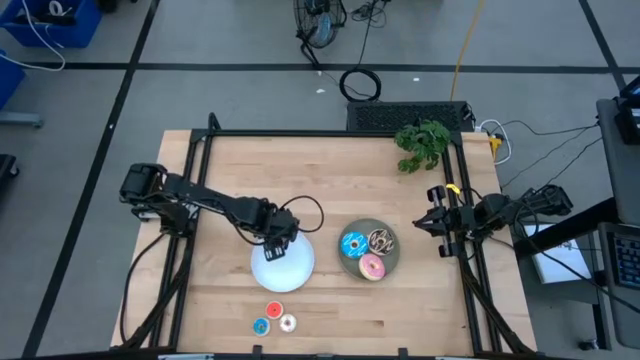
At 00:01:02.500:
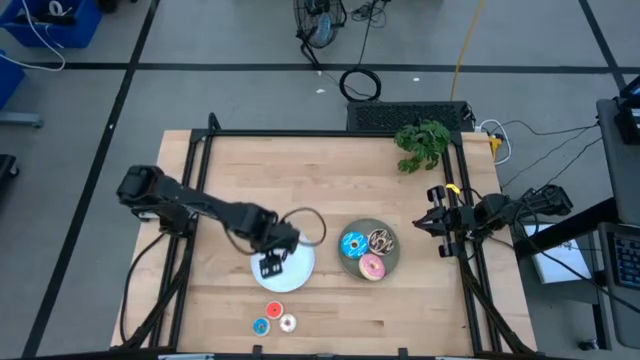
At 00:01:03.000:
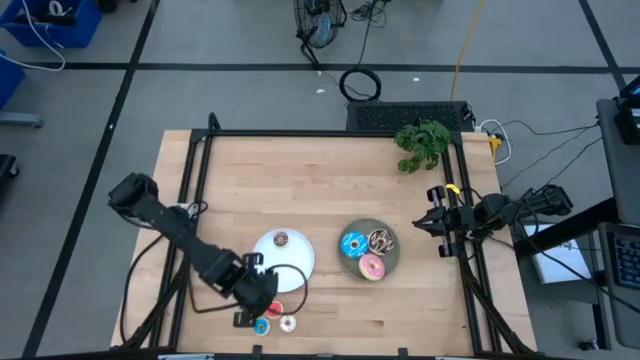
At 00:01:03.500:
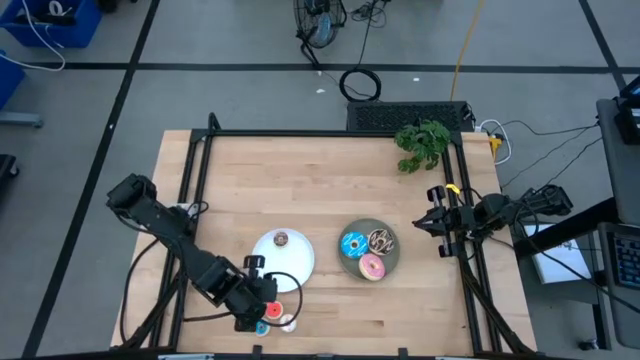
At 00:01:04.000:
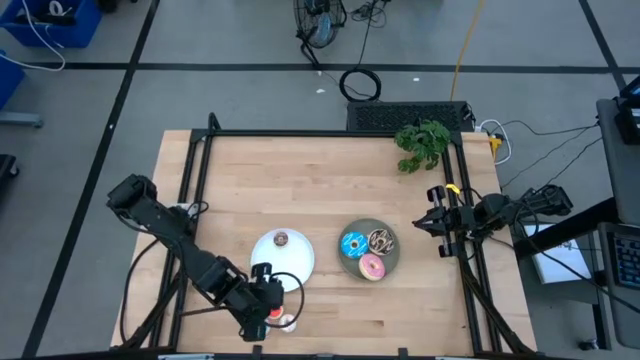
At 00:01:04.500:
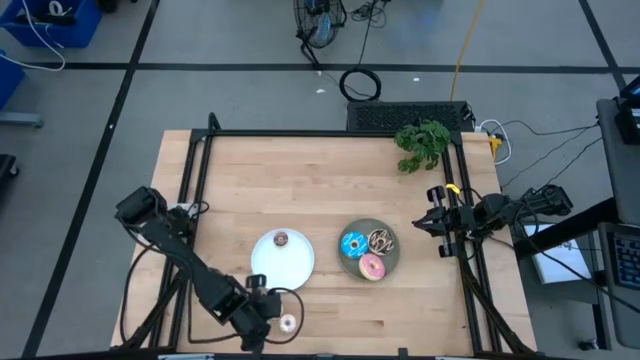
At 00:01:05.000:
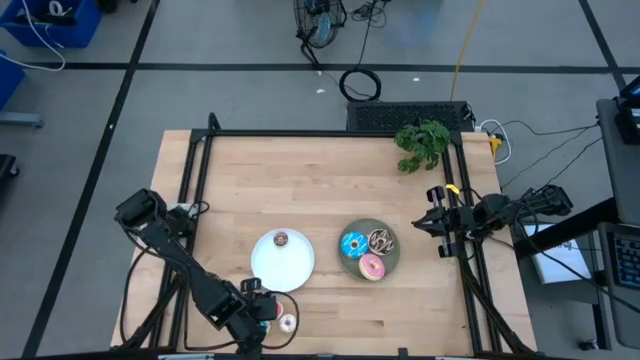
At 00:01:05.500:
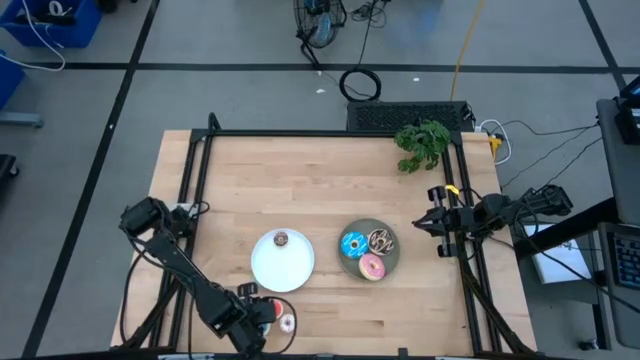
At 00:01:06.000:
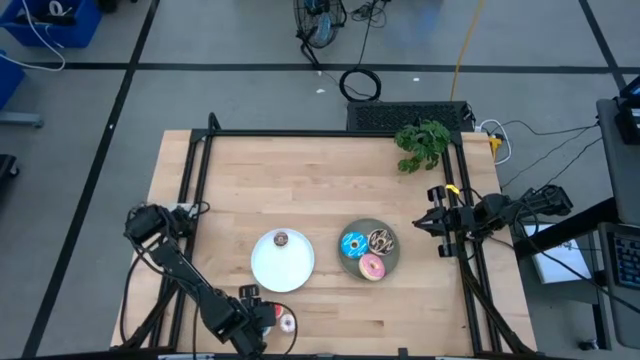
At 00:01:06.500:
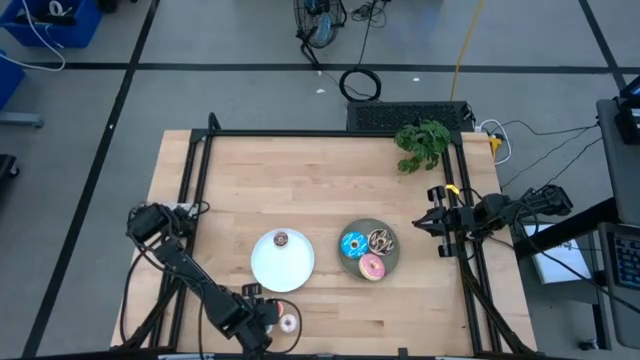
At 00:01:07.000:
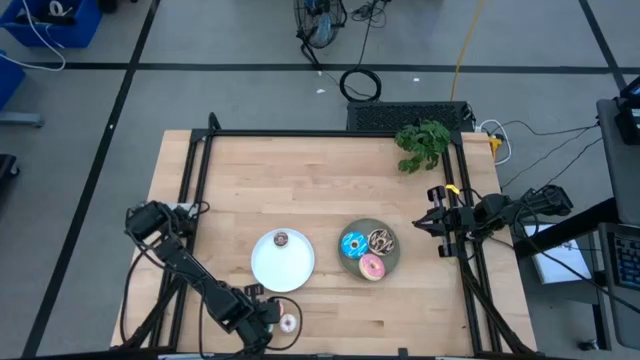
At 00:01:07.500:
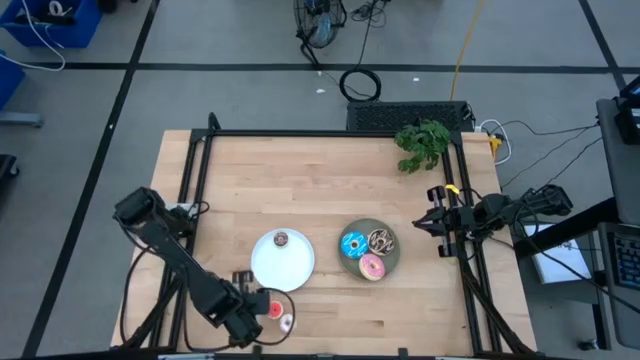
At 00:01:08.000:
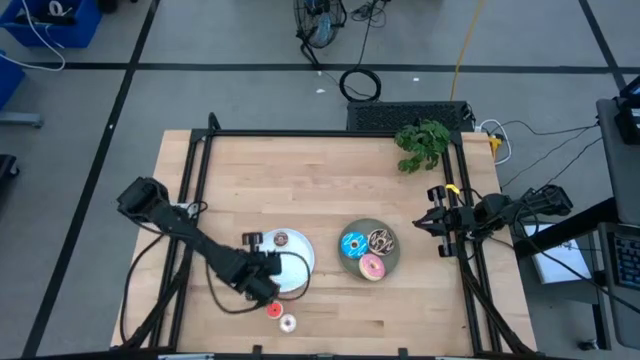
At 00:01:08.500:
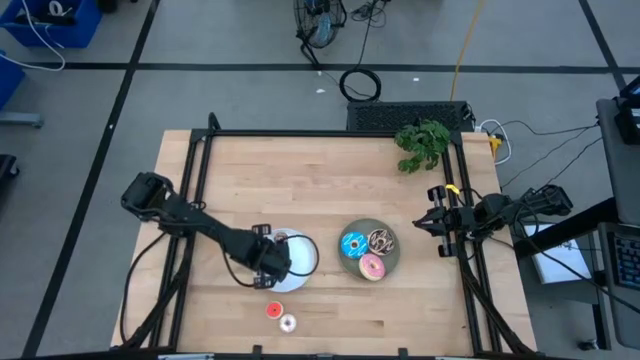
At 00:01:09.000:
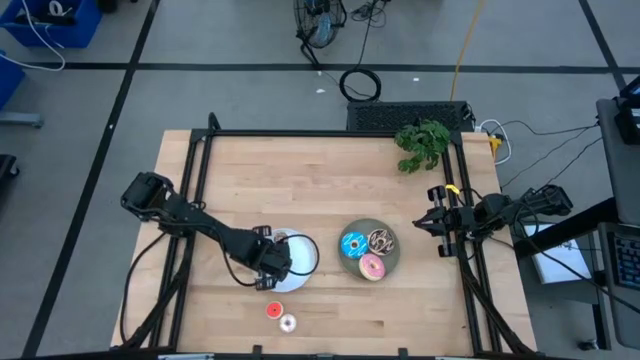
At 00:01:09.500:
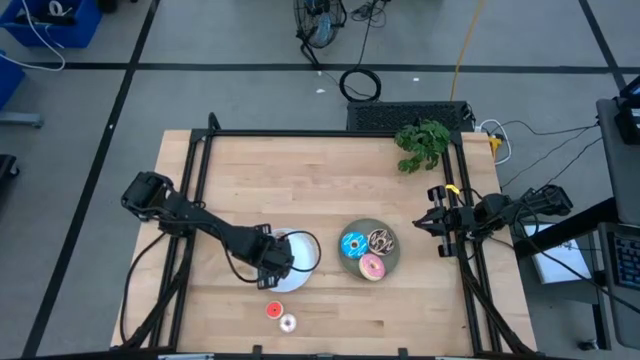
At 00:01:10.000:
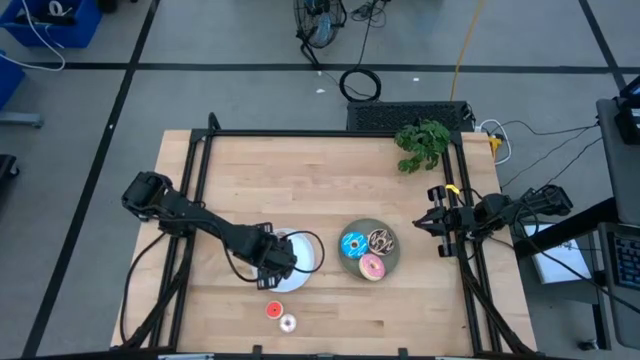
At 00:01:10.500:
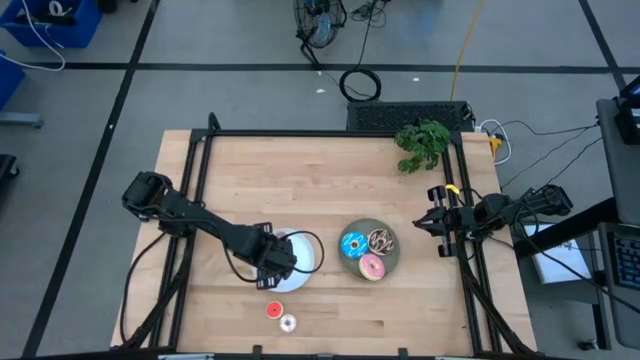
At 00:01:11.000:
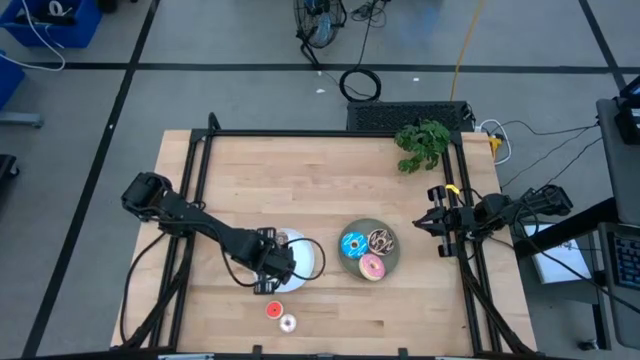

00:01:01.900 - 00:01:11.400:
Task: Pick & Place donuts
Put the small blue donut into the white plate

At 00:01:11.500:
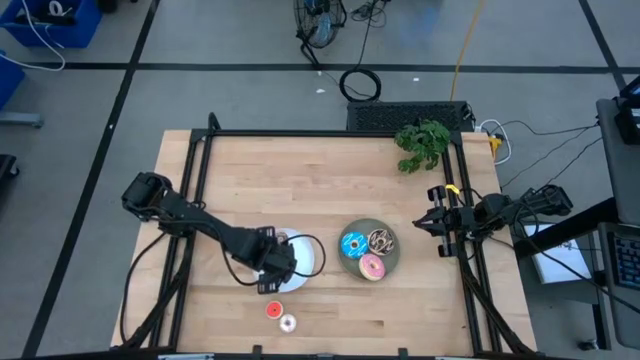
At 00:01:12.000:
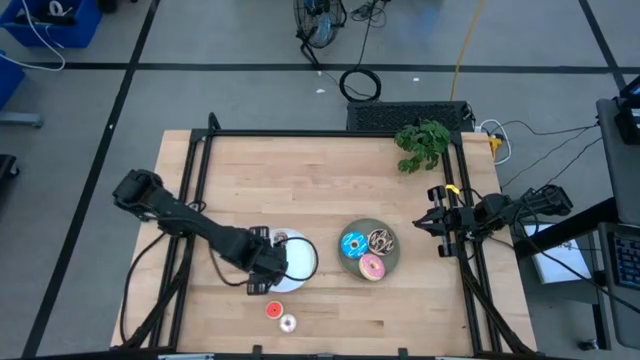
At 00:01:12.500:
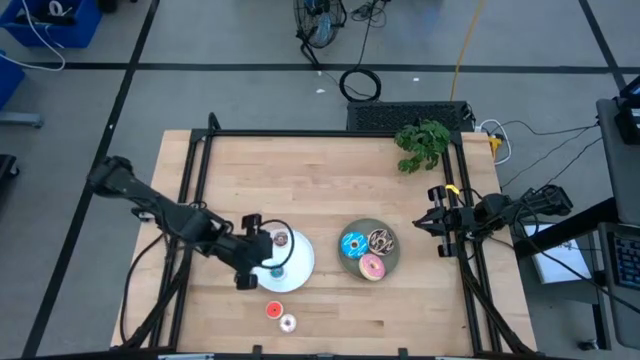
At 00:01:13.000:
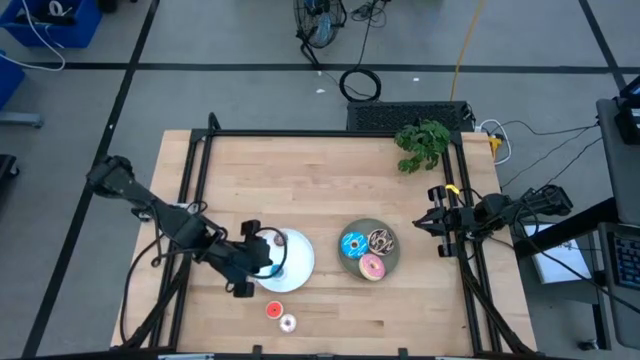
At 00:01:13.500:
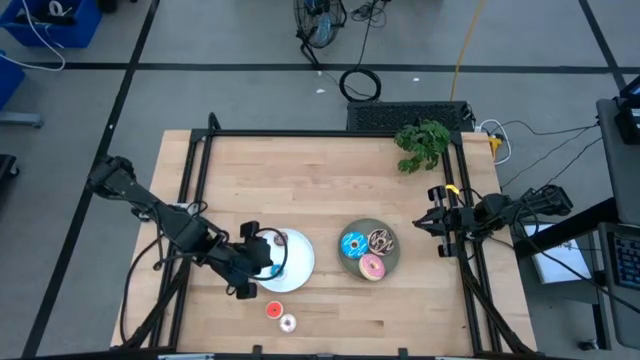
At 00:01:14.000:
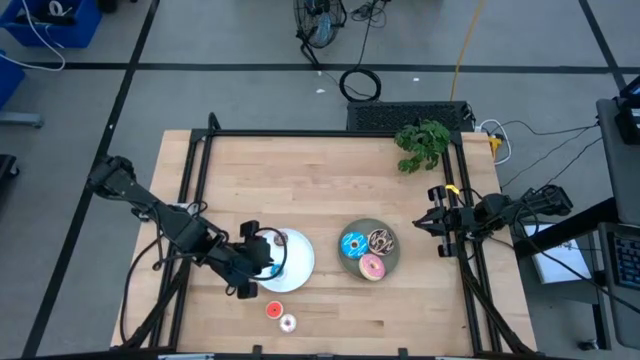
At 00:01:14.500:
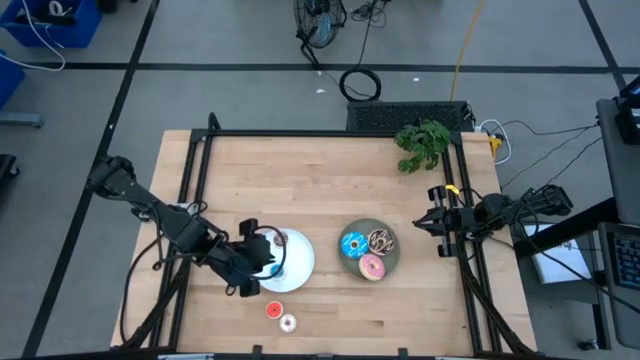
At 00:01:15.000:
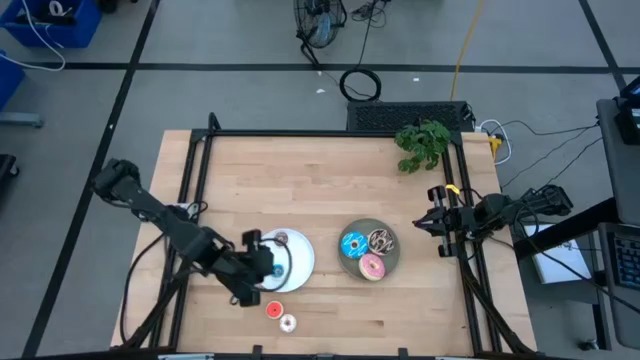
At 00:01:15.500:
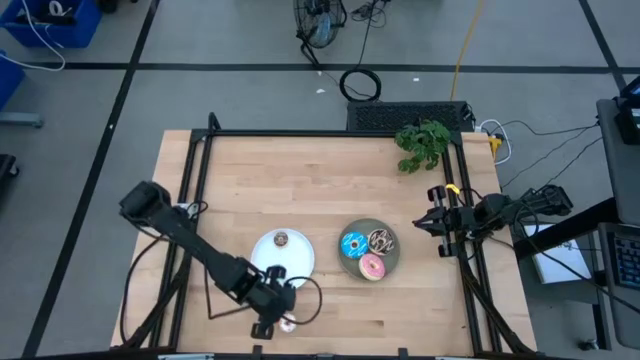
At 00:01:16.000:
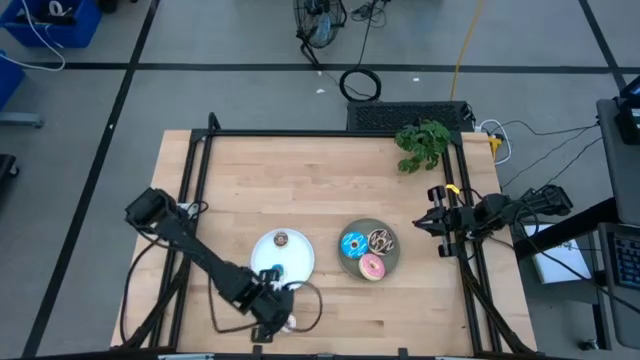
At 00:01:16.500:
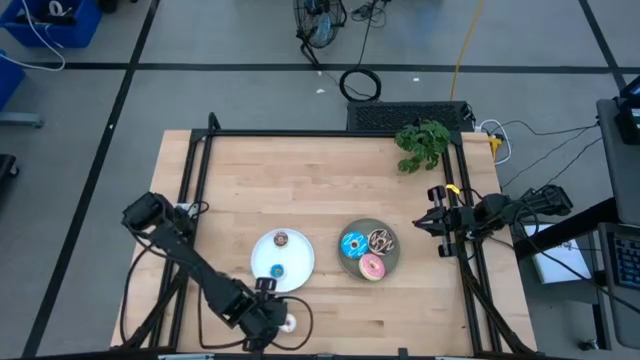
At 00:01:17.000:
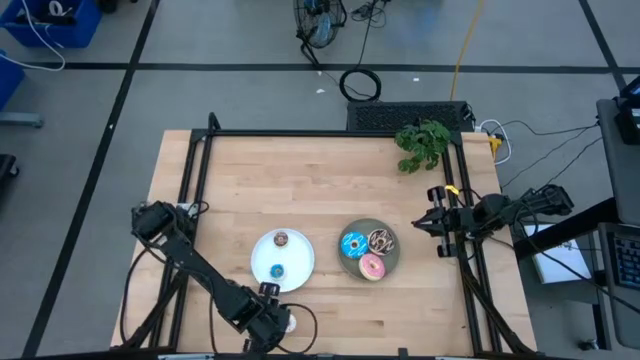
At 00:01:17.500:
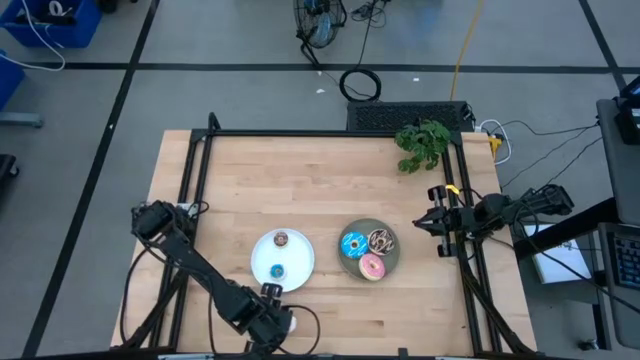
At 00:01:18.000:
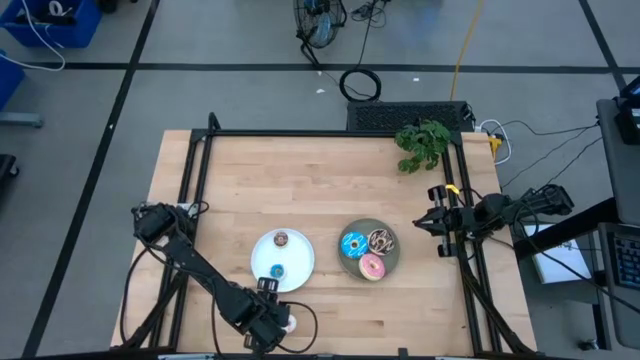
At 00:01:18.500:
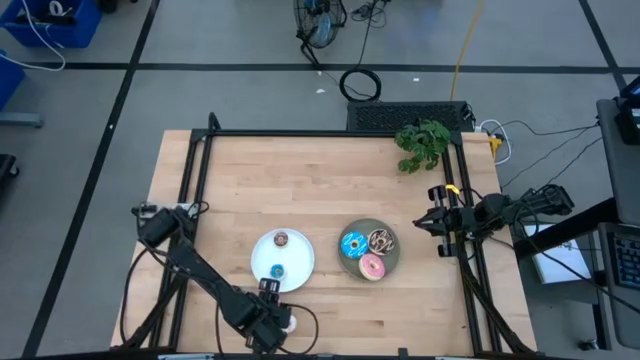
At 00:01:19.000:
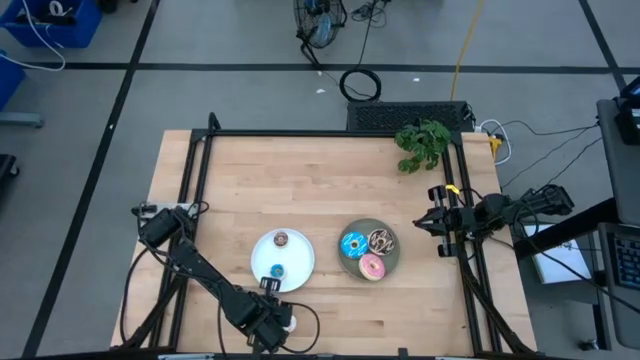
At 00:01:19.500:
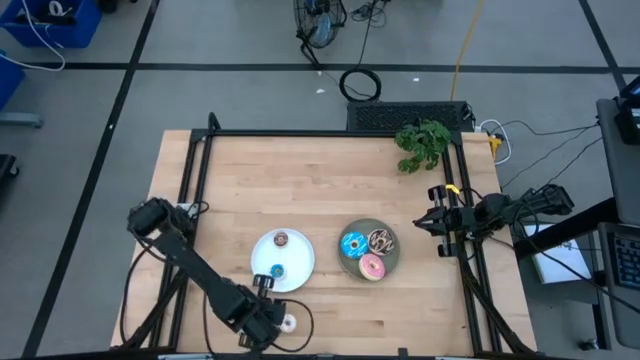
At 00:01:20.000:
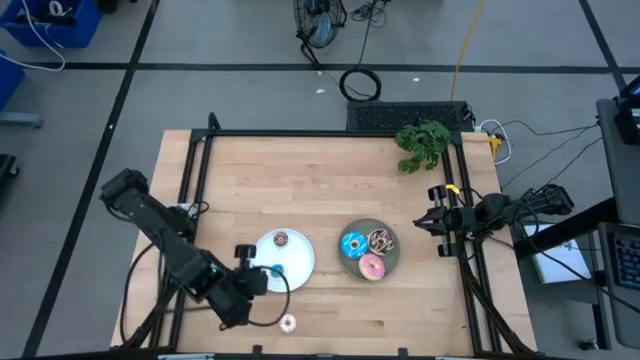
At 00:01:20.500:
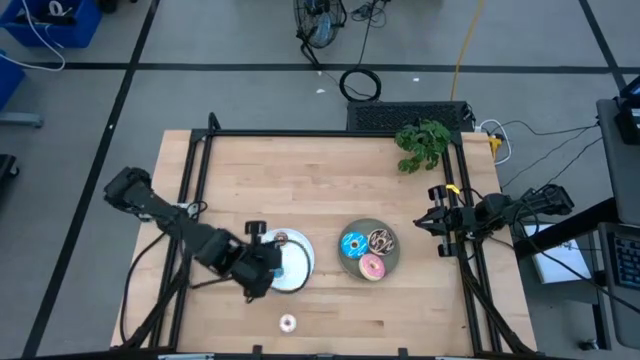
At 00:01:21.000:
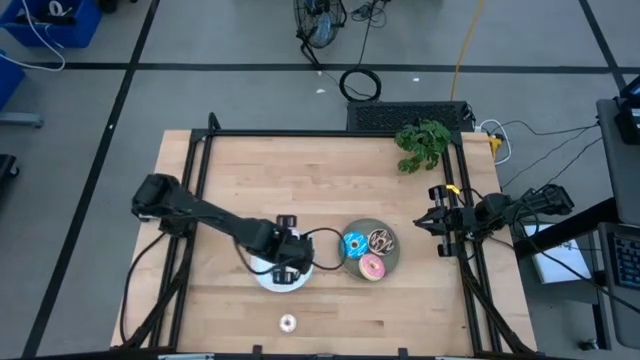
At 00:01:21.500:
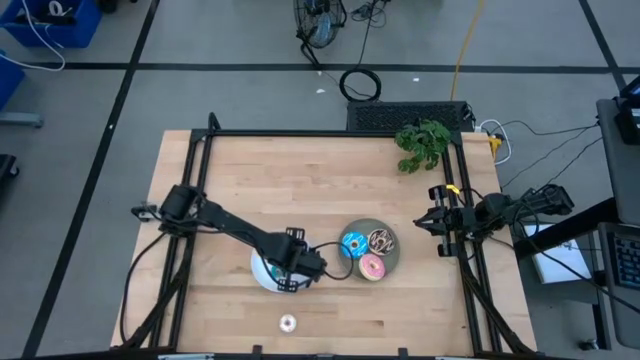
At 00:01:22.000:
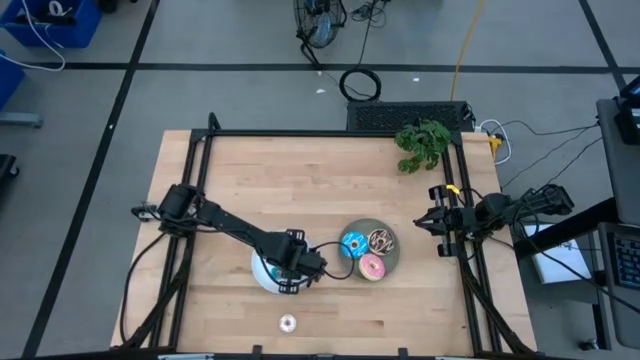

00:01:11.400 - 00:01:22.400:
Put the small orange donut into the white plate

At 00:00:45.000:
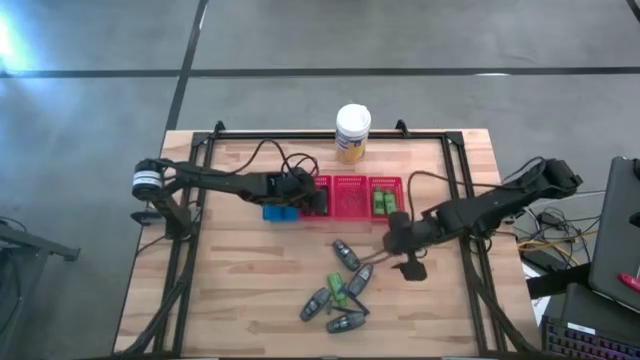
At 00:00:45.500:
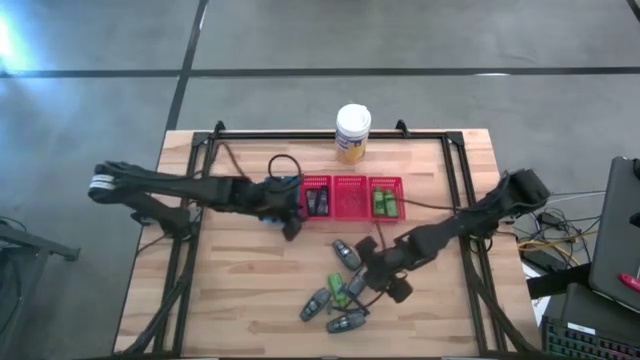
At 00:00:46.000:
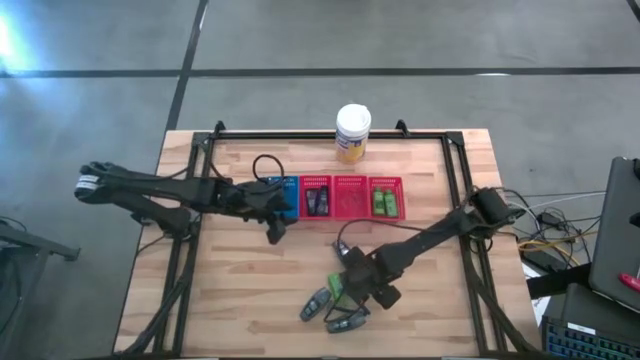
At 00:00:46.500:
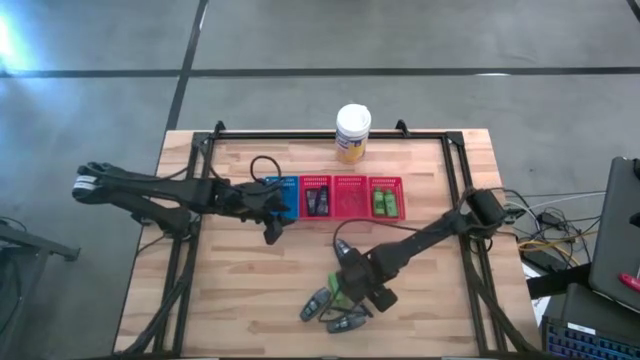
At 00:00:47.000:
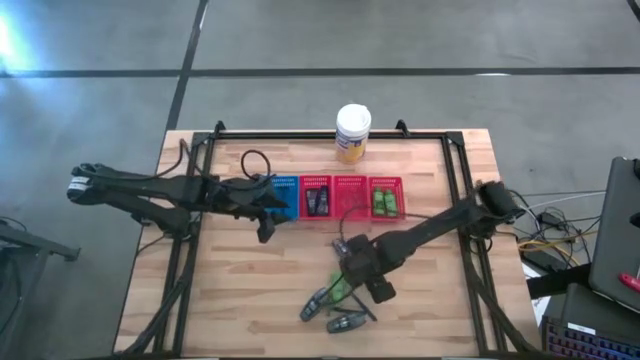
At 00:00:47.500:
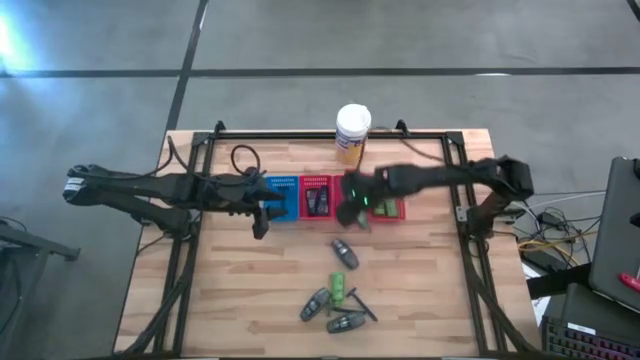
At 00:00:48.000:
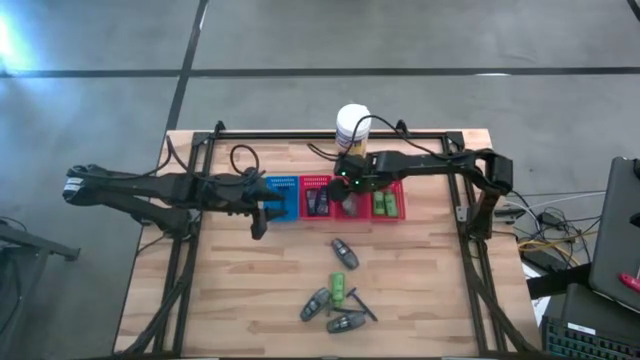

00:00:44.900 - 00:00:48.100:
Task: Pick & Place Travel size toiletries
Put the black deodorant into the middle red bin
